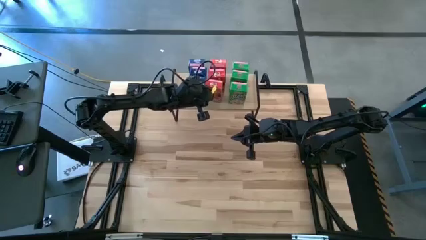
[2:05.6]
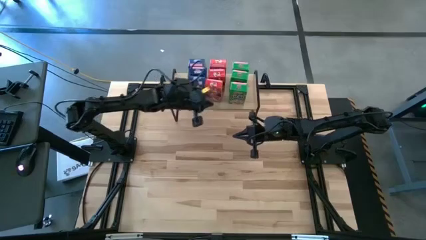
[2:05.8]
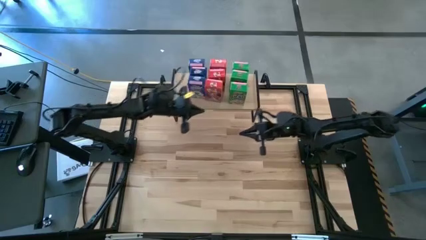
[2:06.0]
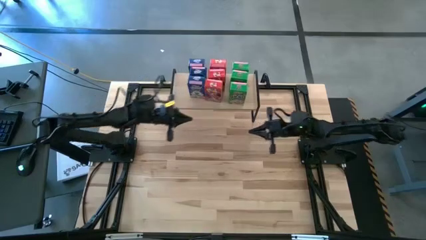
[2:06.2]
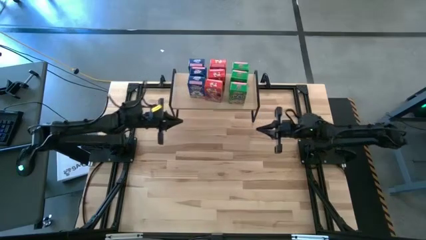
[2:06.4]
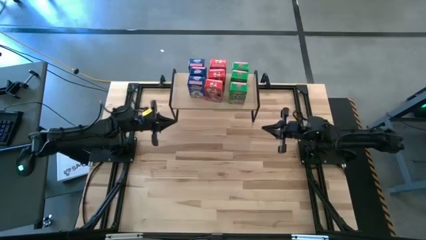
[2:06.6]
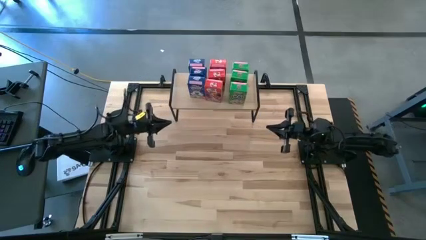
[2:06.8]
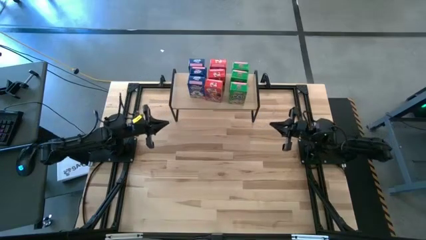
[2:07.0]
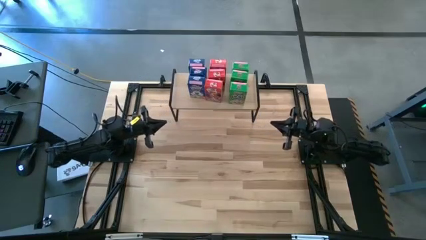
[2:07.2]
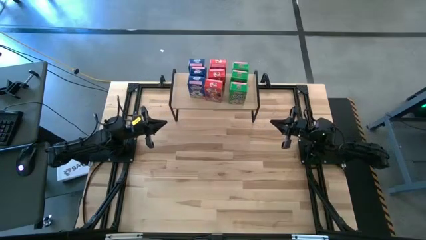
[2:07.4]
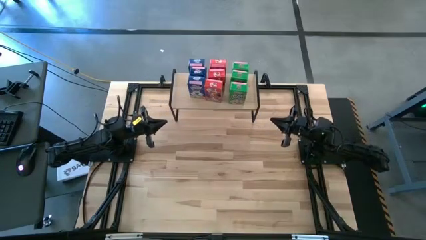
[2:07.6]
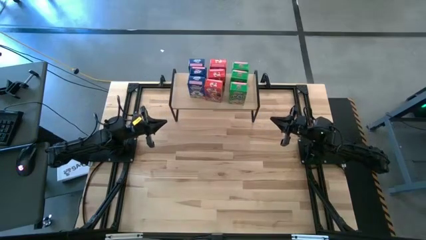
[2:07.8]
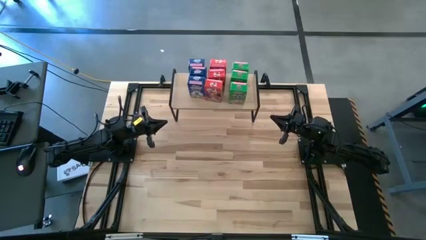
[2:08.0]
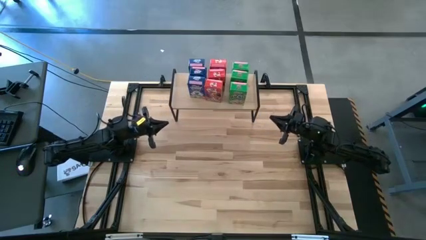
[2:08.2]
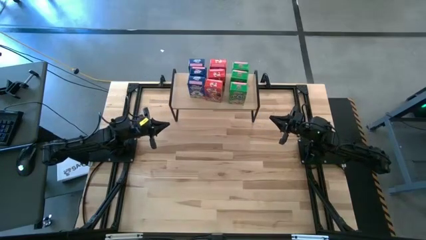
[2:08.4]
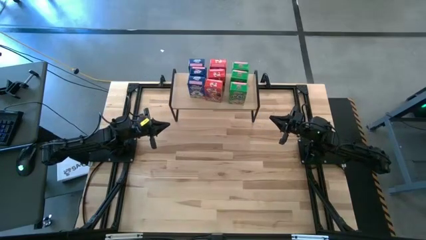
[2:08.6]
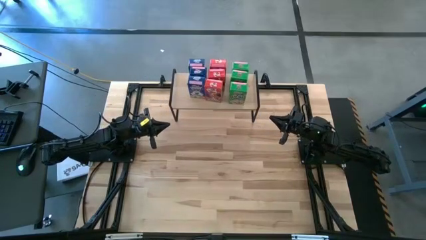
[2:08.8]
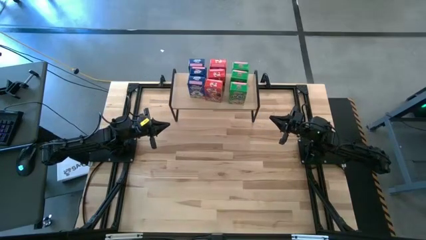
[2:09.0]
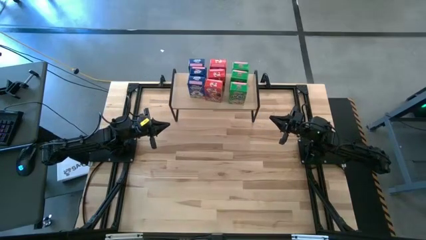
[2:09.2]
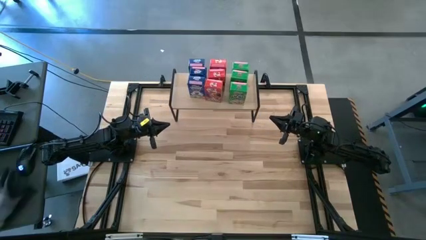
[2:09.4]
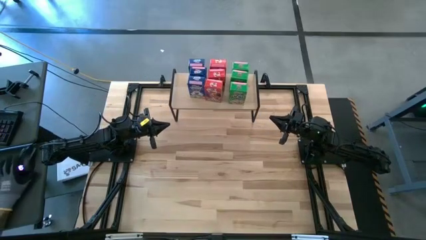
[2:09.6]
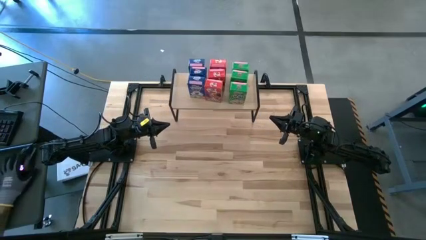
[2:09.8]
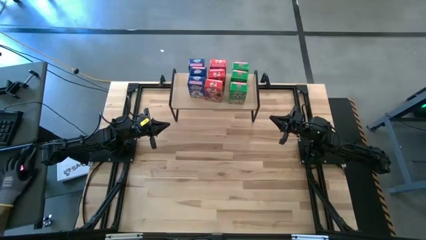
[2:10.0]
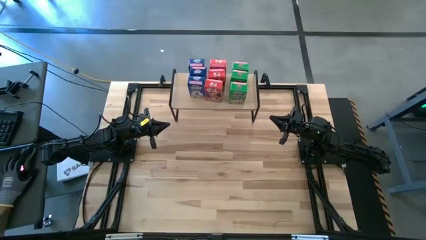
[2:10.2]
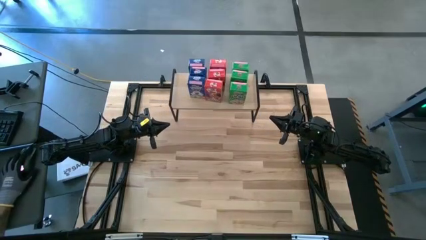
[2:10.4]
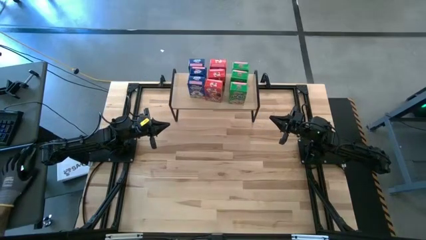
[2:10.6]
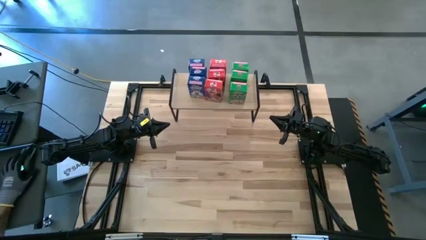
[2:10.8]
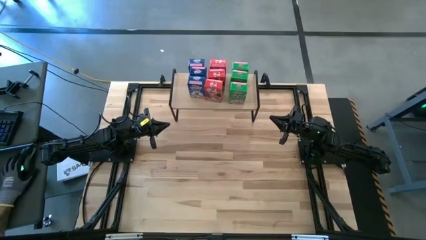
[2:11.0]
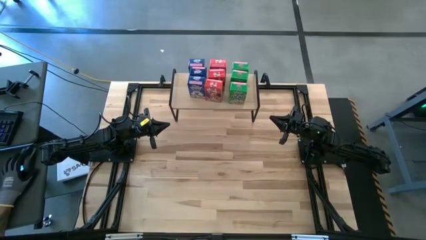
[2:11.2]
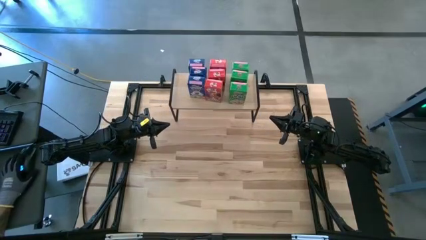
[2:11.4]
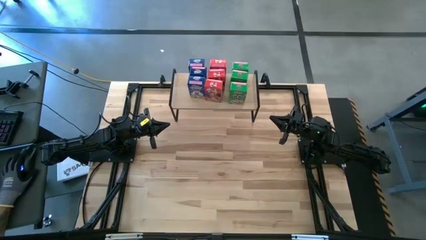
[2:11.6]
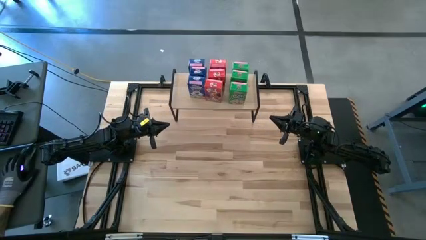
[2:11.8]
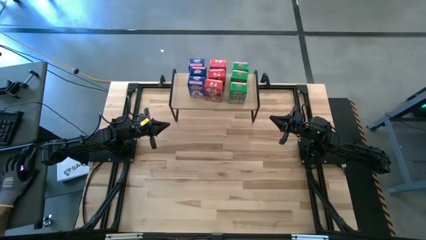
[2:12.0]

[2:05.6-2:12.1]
Task: Stack cereal on shelf
Return to Home Position
